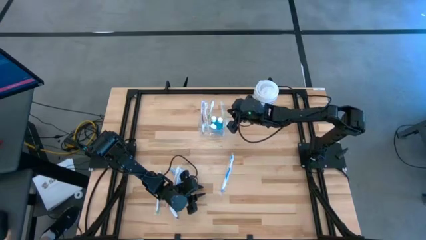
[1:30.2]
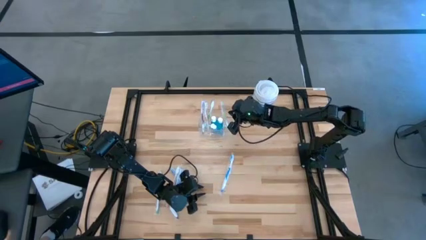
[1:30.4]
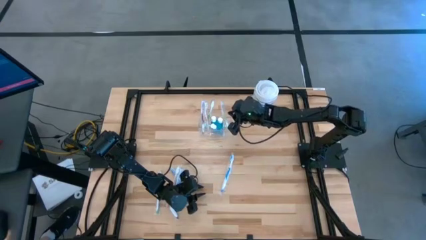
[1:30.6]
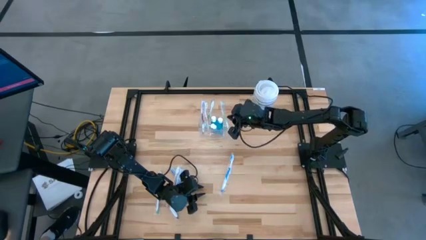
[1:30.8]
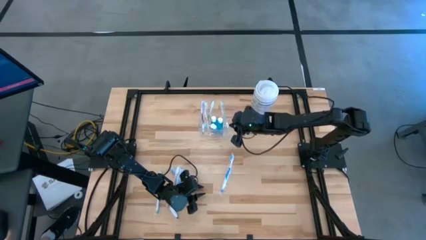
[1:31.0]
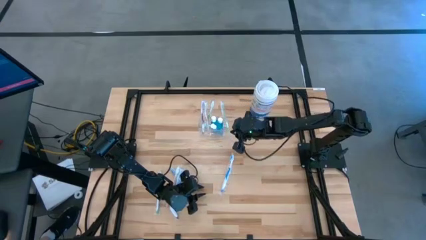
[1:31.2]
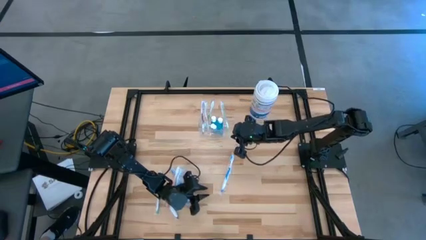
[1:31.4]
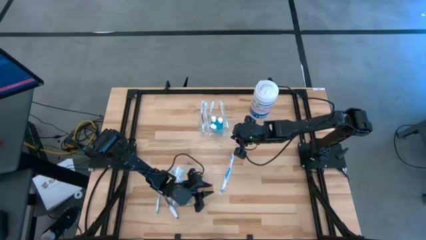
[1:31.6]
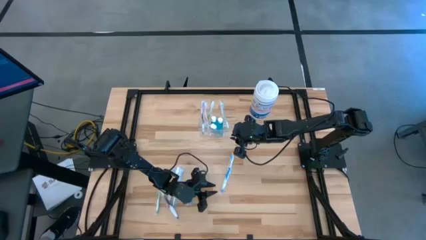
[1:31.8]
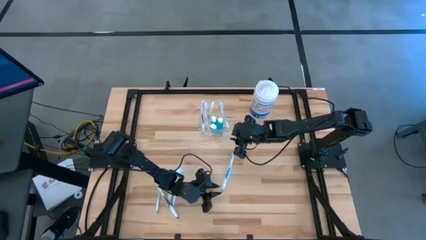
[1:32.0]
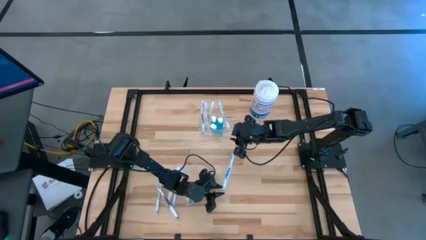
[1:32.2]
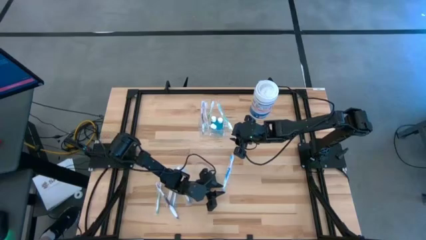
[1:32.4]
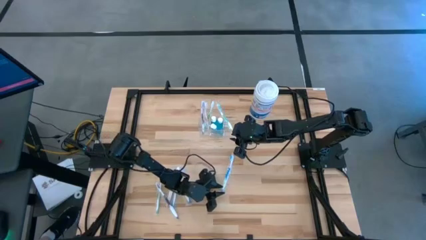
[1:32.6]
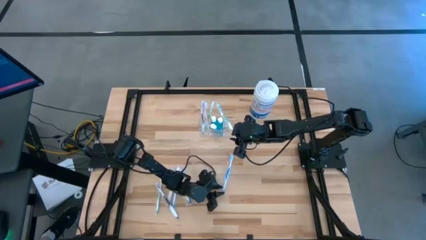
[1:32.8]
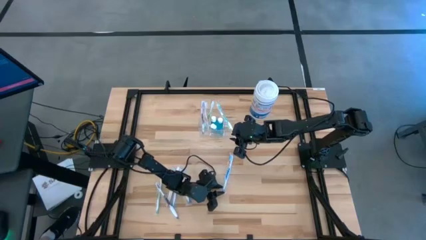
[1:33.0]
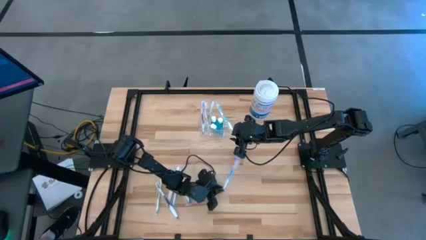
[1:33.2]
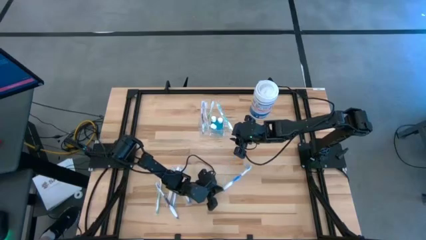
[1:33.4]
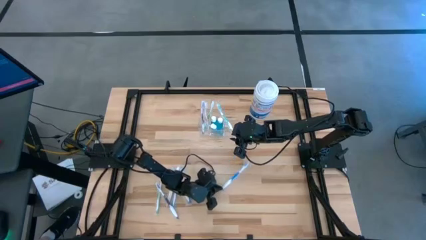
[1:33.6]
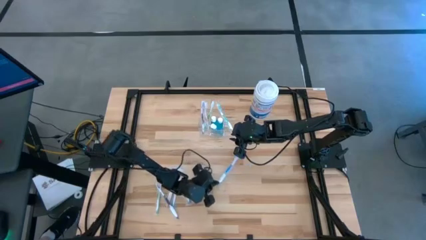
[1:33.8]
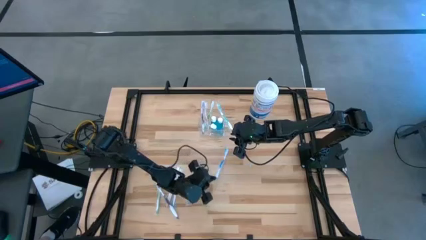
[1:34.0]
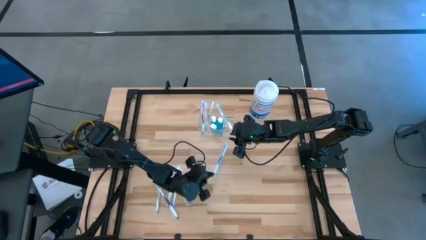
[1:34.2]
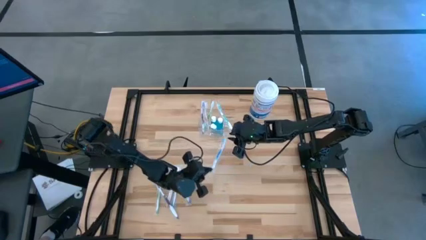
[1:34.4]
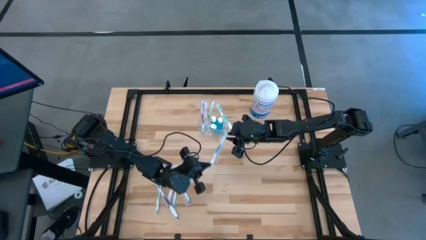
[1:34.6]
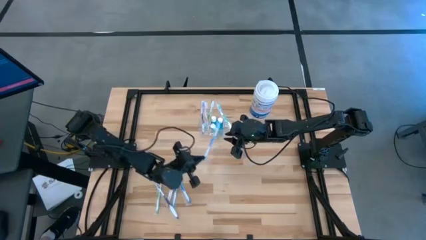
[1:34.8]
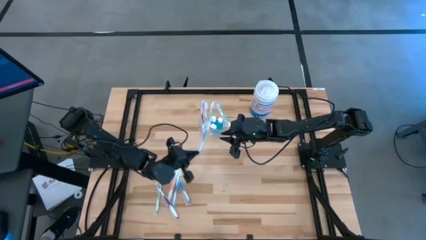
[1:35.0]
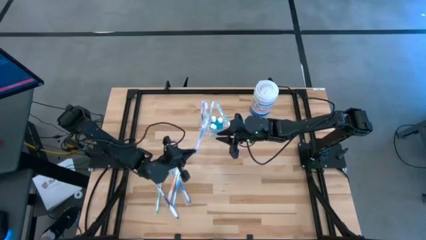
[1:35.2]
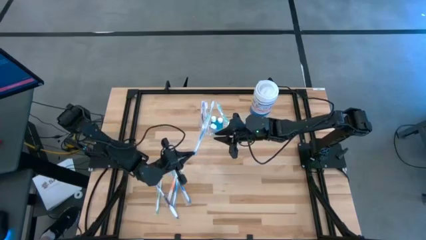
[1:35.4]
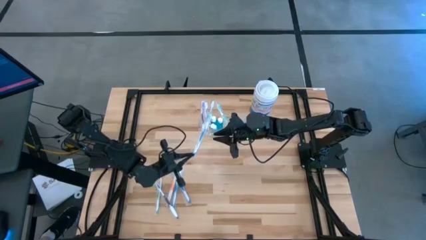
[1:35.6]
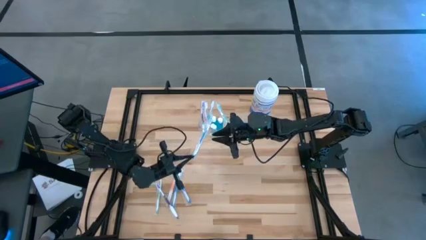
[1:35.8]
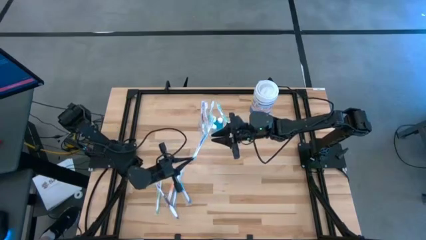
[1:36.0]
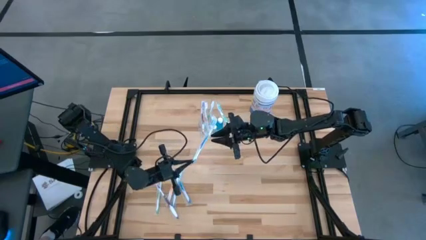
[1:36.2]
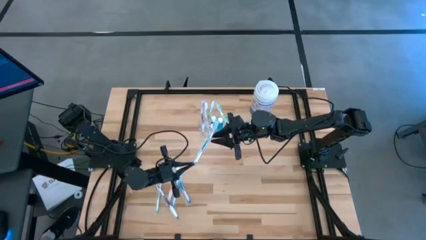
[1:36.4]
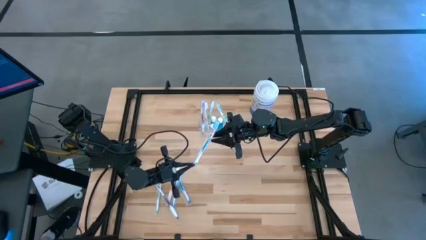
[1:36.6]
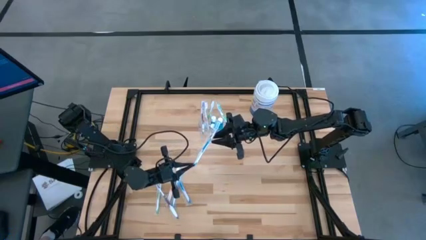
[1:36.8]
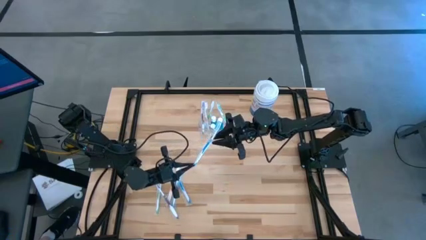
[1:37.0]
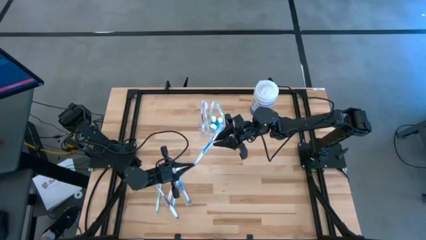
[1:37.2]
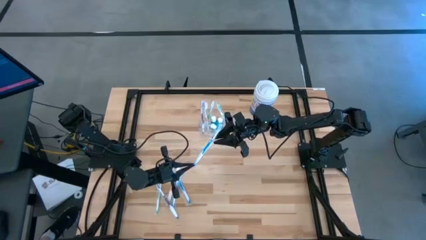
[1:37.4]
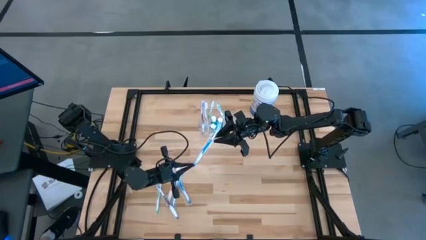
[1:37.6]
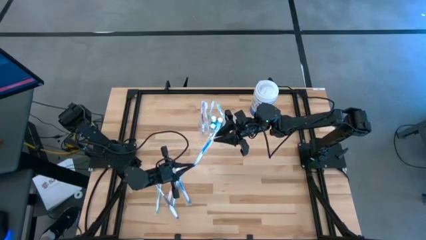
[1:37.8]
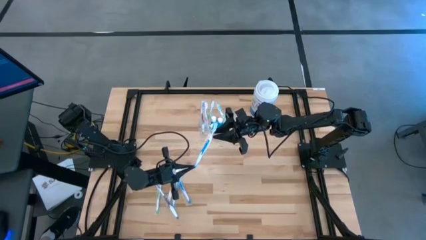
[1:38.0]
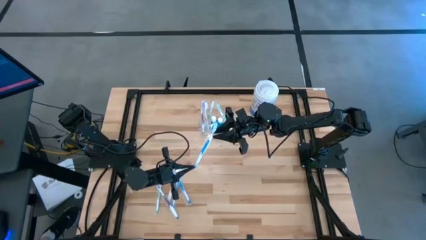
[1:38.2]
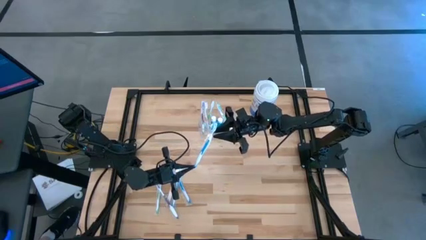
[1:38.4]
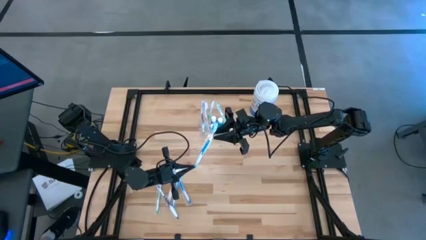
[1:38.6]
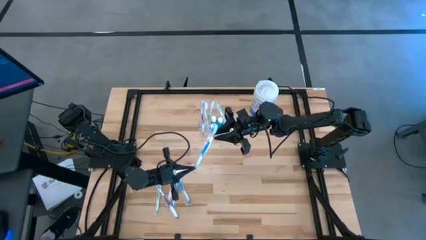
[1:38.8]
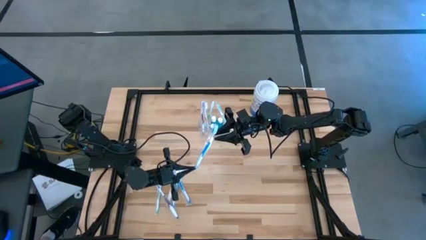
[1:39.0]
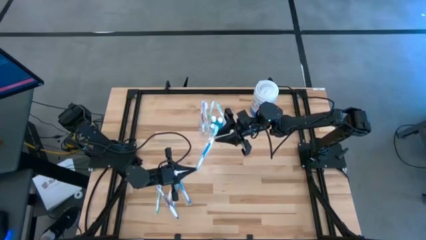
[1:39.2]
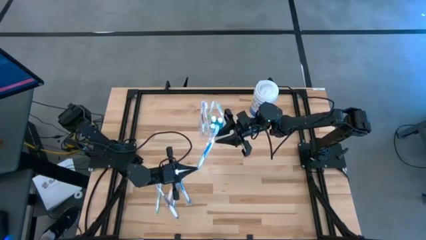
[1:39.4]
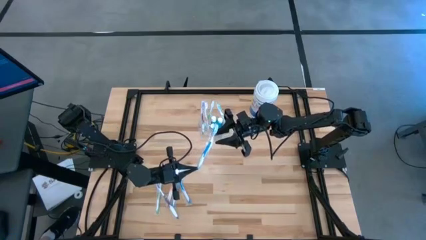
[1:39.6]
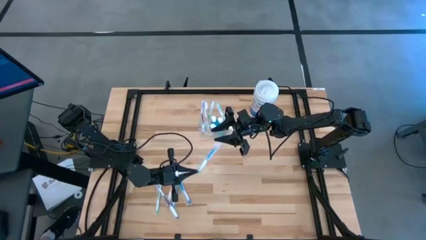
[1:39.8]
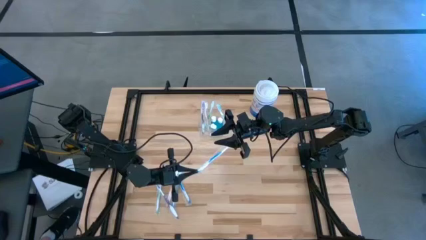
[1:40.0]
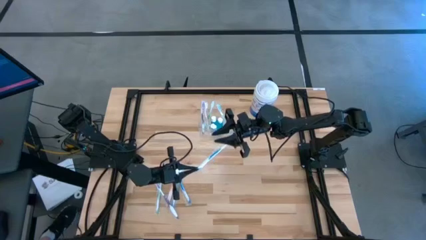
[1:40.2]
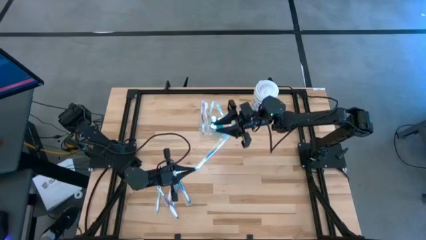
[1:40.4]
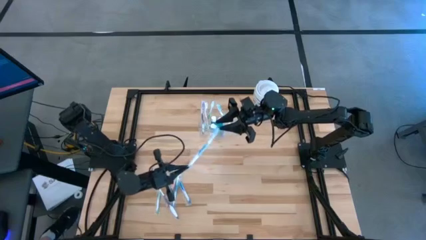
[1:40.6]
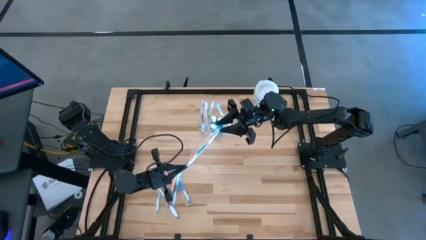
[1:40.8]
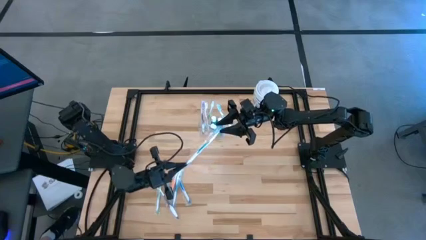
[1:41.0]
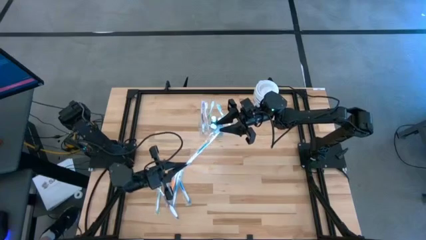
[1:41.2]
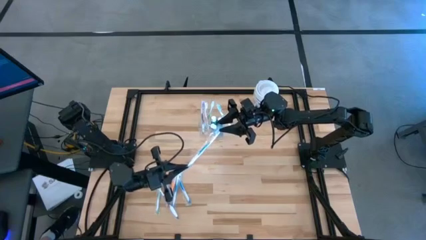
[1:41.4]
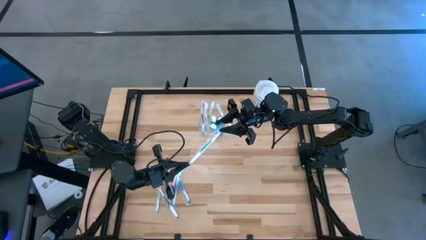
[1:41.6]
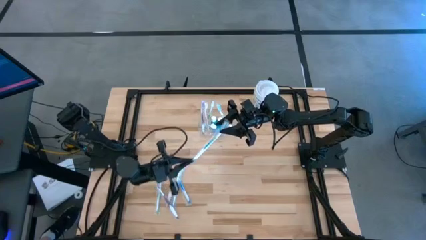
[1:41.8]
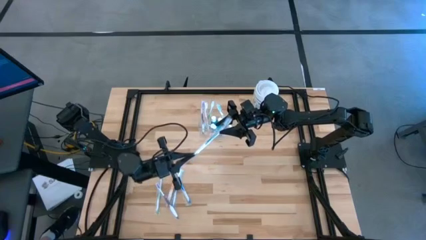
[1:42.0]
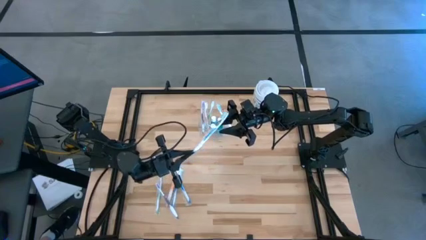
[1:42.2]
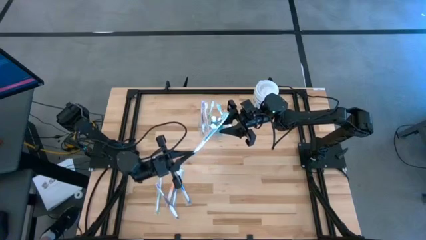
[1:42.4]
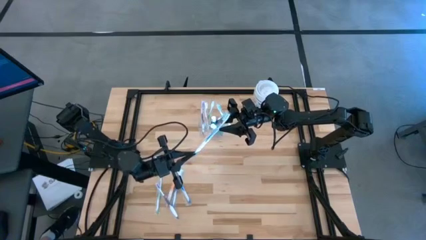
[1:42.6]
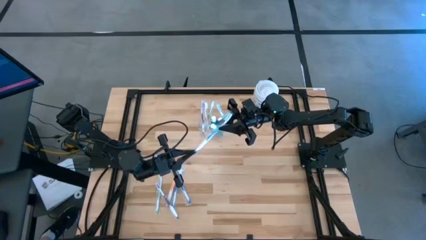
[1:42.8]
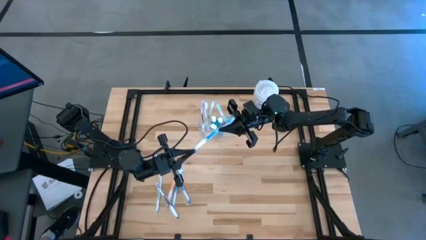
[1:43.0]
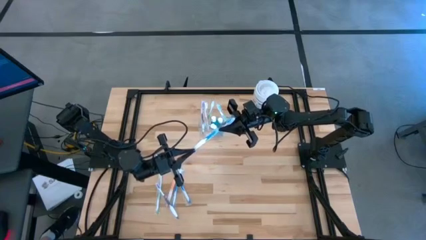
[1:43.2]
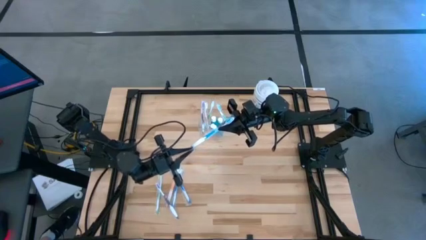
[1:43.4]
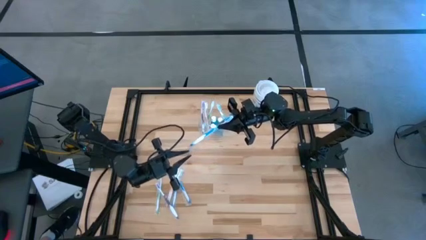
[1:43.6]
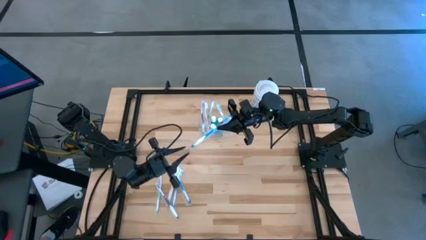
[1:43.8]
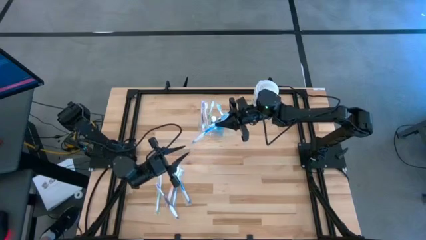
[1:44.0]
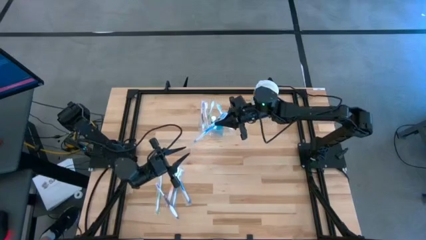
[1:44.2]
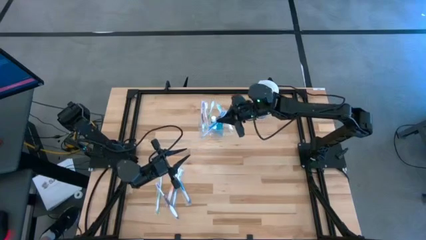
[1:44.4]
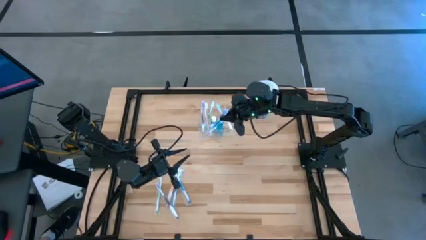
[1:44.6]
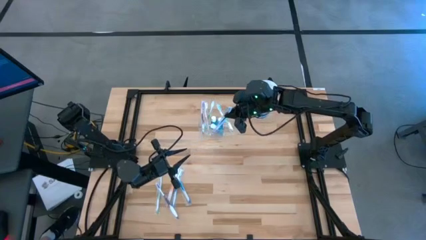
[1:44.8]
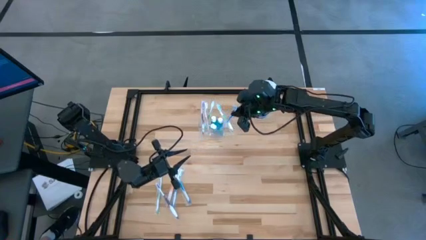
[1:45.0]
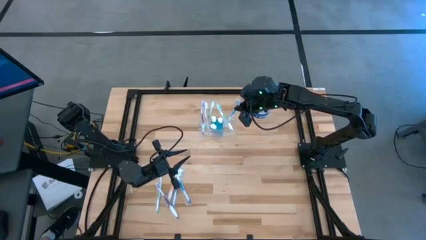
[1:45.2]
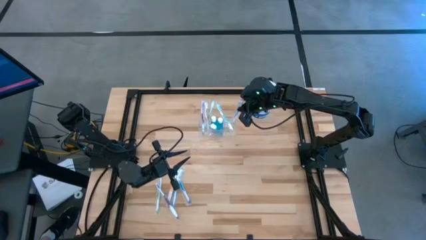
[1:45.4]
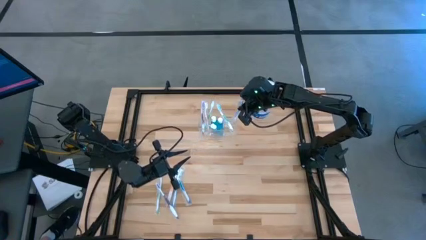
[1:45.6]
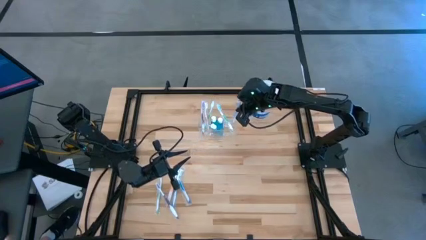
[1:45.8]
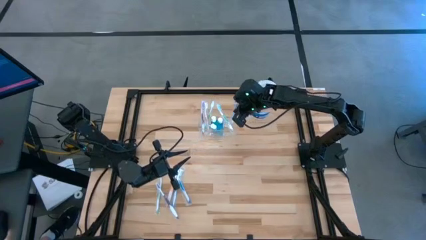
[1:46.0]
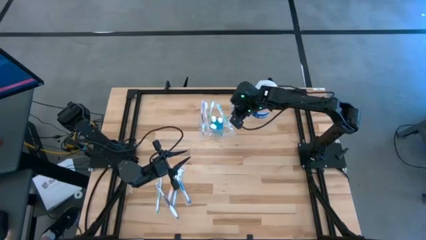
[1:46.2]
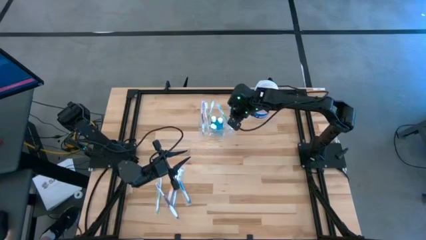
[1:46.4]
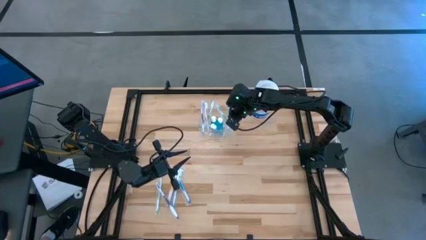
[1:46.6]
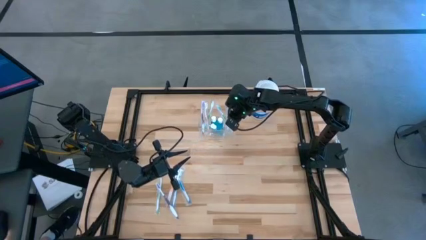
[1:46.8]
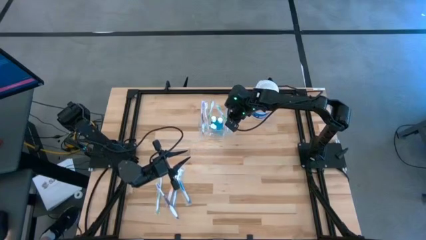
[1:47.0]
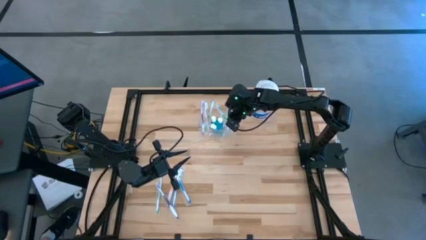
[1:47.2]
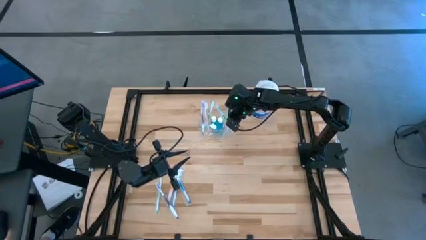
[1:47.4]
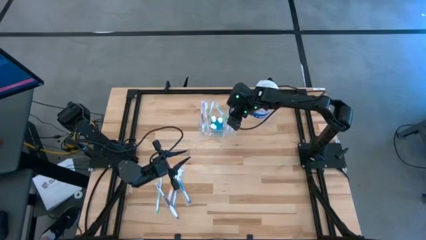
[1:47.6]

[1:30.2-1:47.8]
Task: Pick & Place toothbrushing station
Put the right blue toothbrush into the transparent organizer
